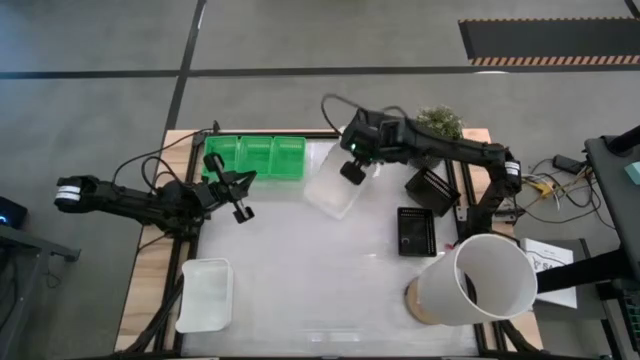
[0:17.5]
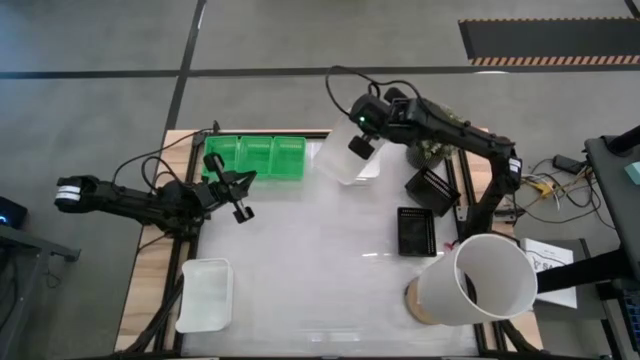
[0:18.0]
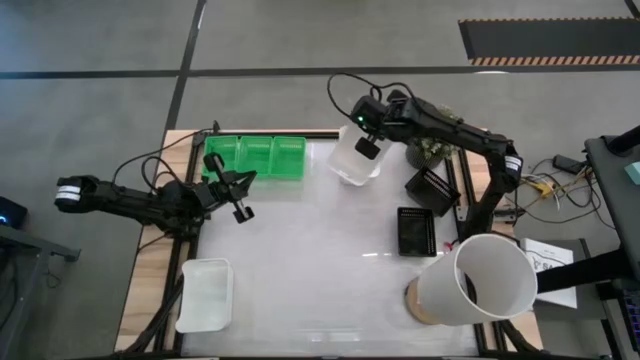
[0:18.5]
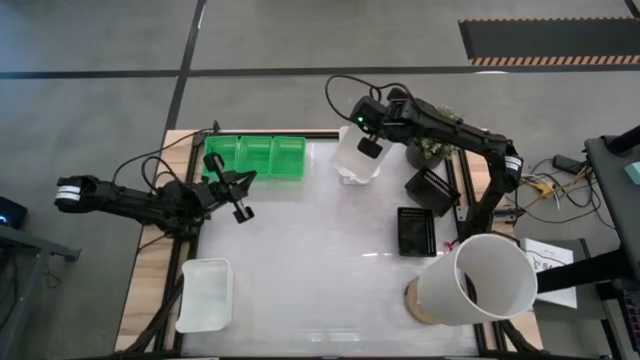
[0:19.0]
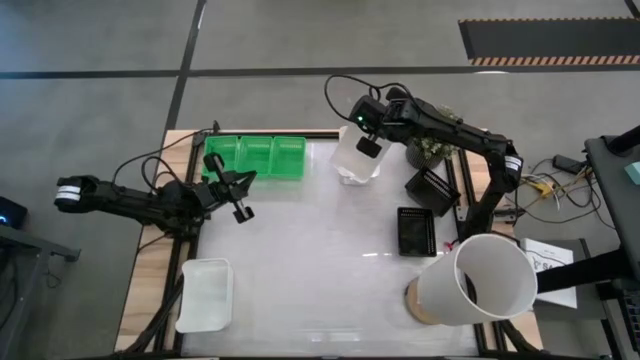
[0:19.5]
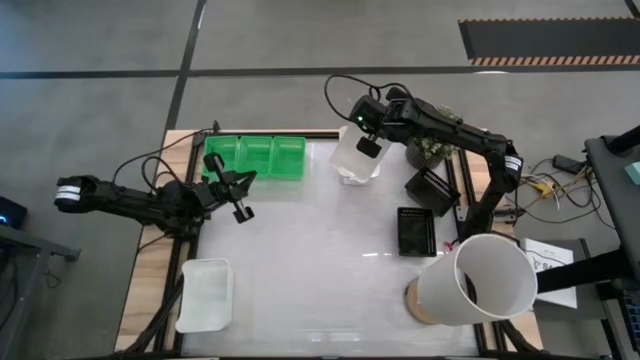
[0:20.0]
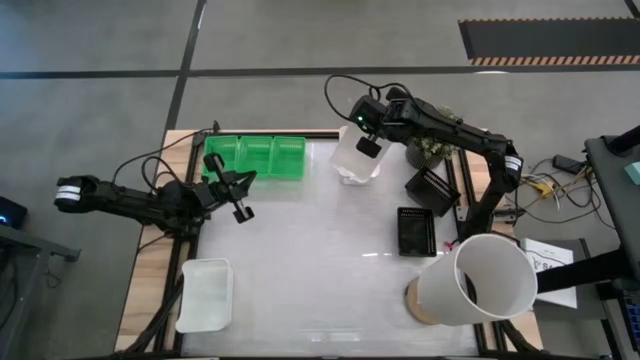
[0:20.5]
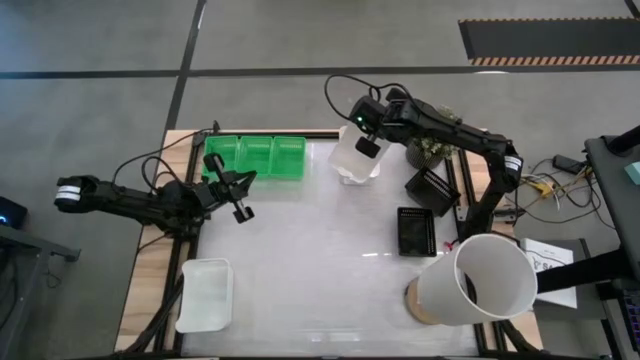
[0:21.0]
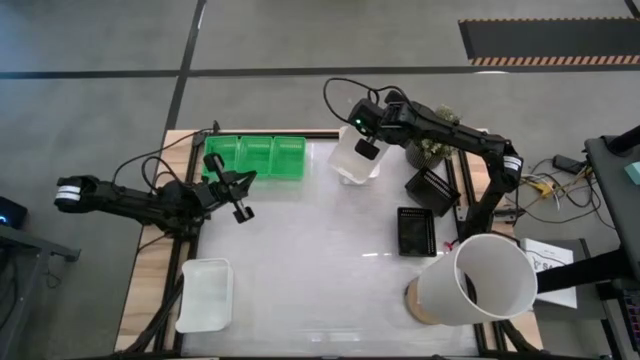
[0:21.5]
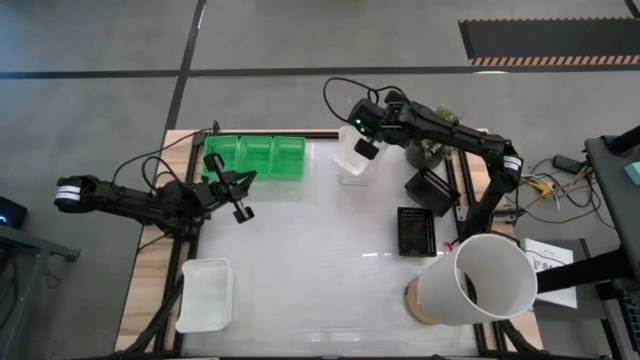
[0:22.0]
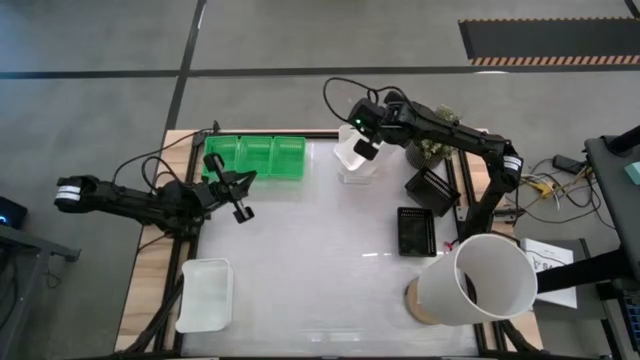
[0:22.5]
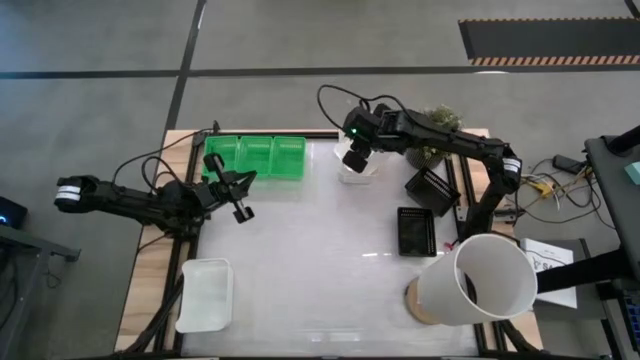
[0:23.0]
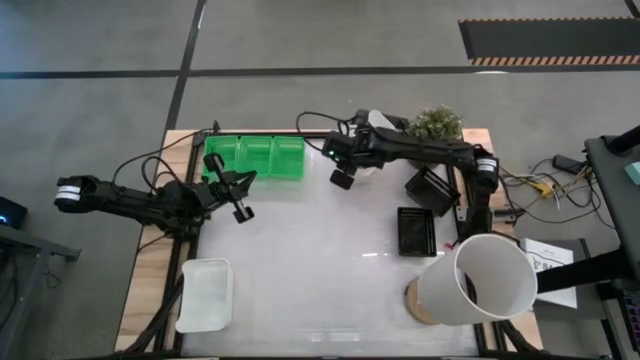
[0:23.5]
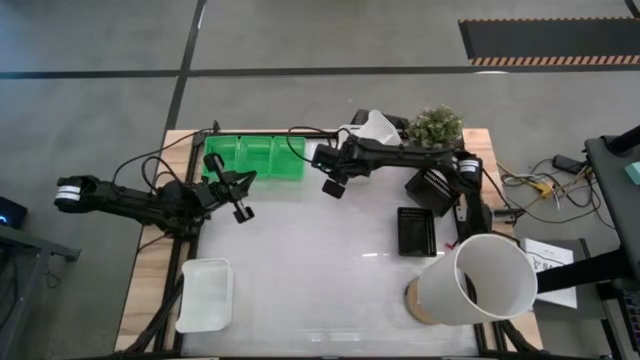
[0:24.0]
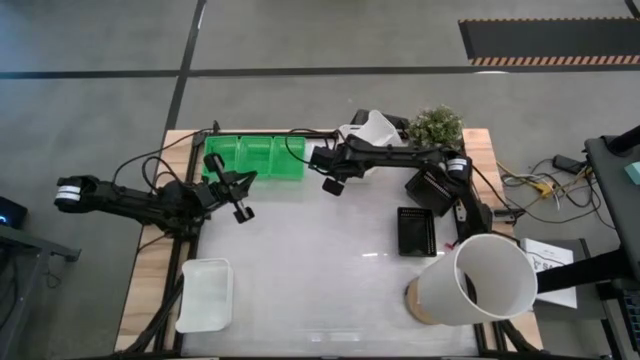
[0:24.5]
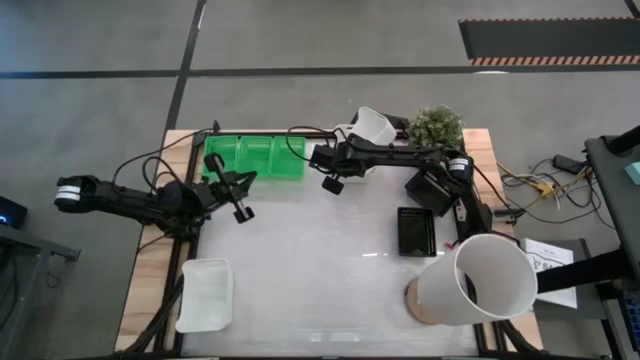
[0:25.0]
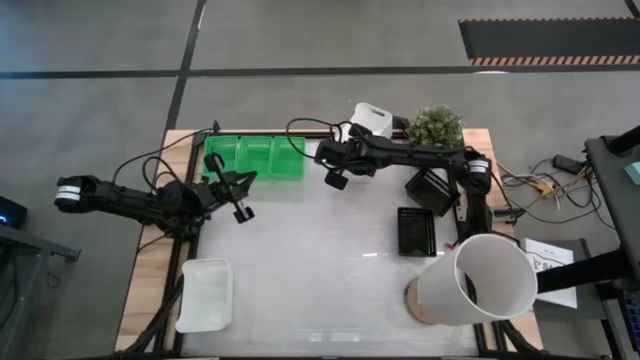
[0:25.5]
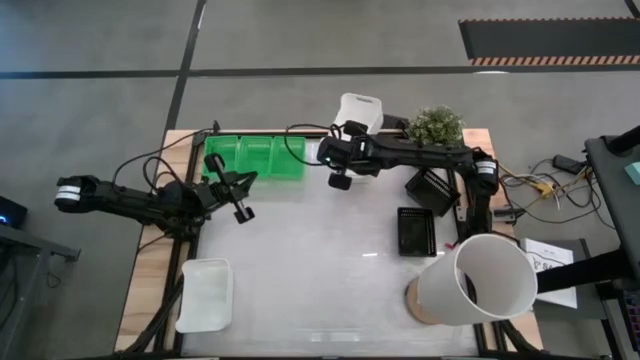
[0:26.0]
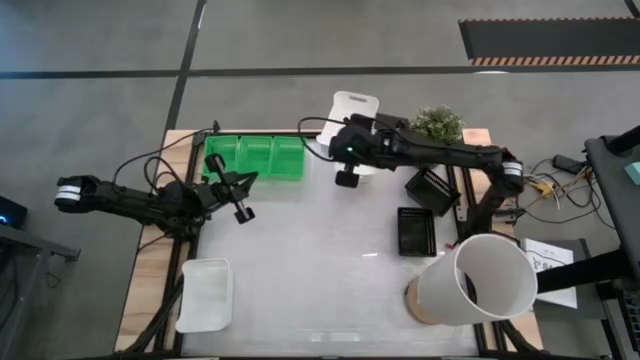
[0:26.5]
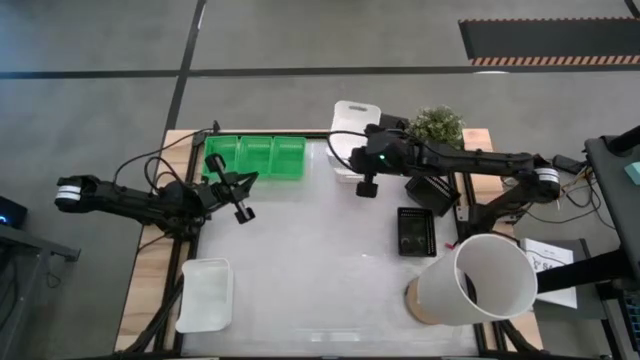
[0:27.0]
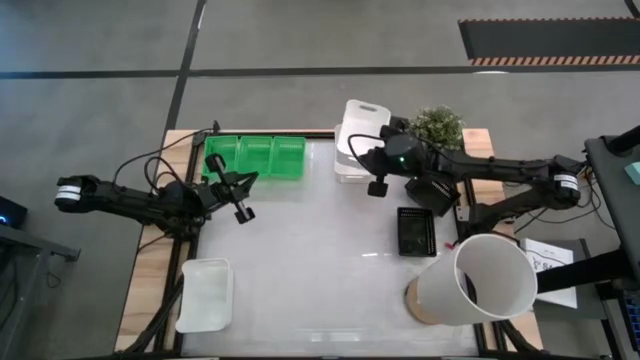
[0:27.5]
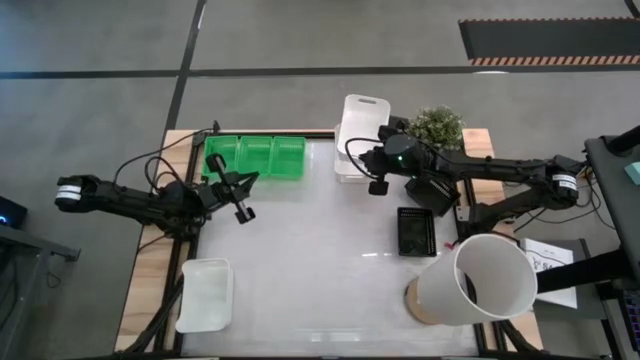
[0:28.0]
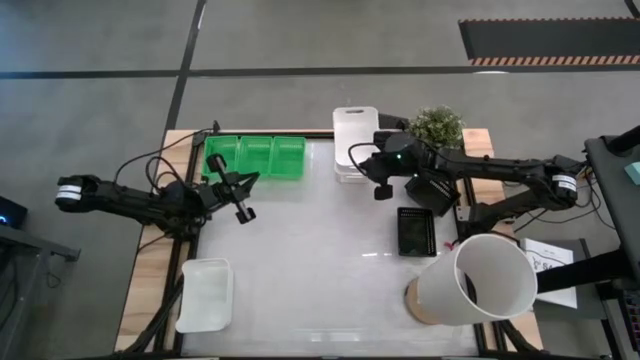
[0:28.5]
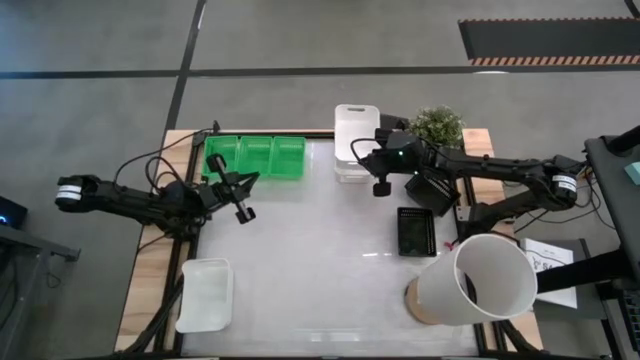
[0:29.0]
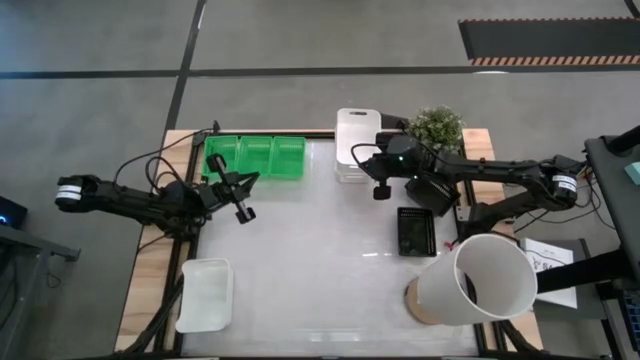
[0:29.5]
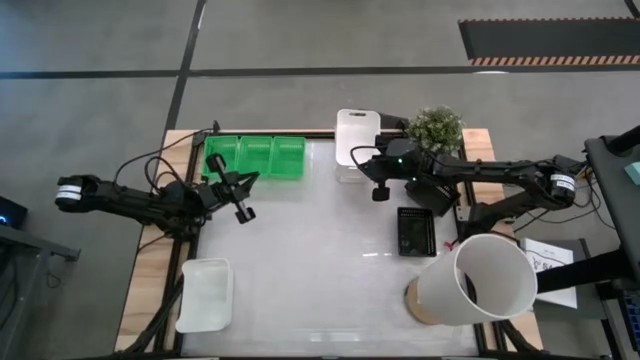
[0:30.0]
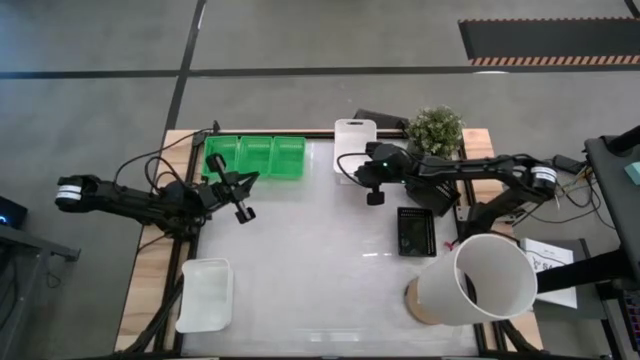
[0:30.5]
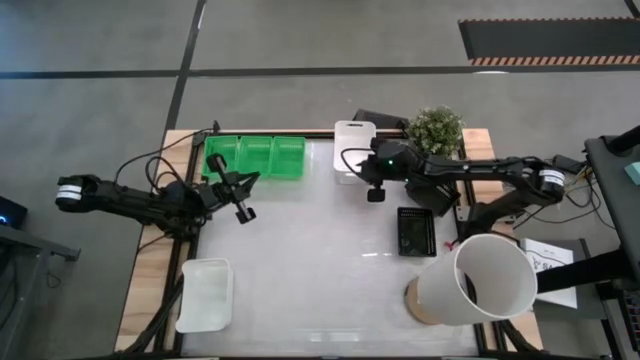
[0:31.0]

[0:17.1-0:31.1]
Stack the middle right white bin on top of the top white bin

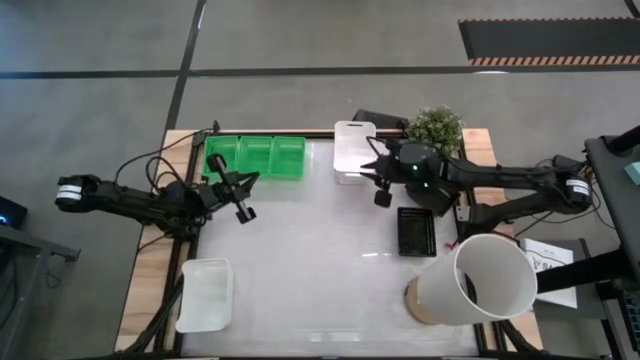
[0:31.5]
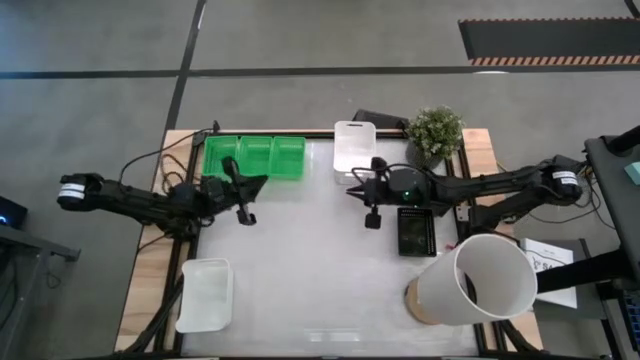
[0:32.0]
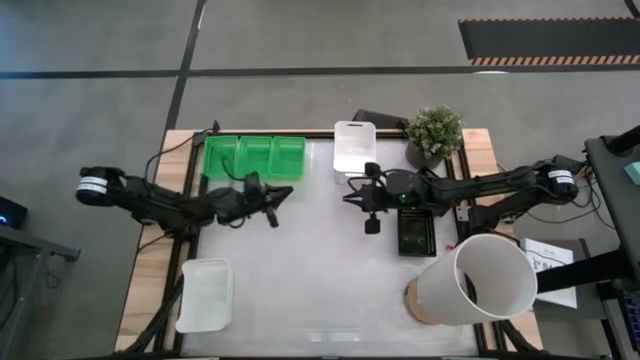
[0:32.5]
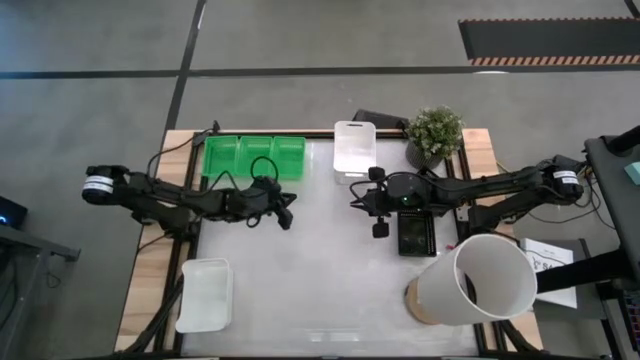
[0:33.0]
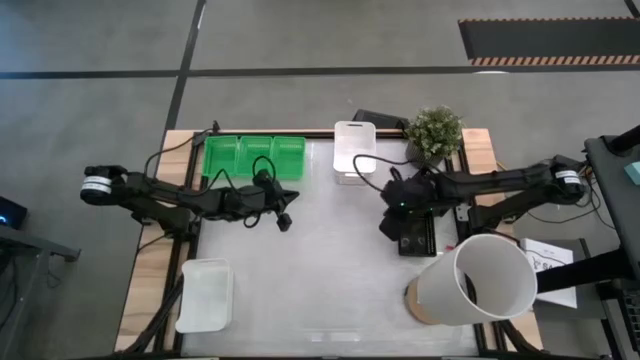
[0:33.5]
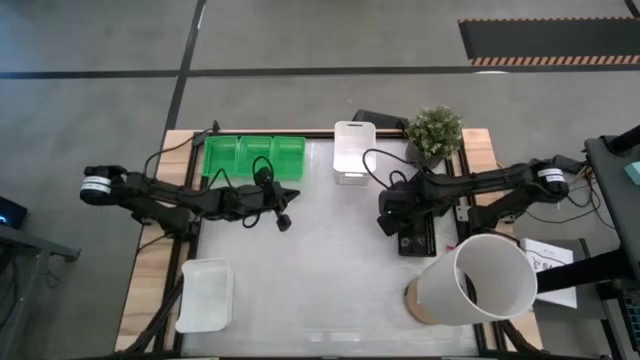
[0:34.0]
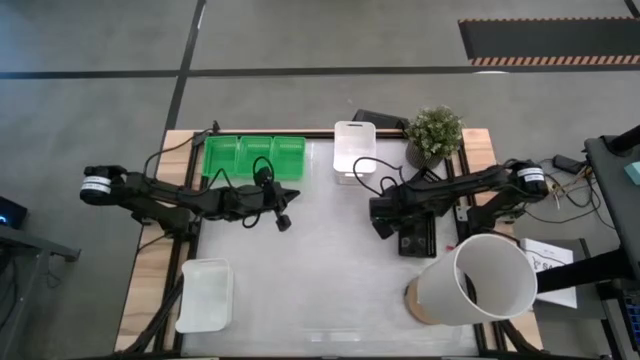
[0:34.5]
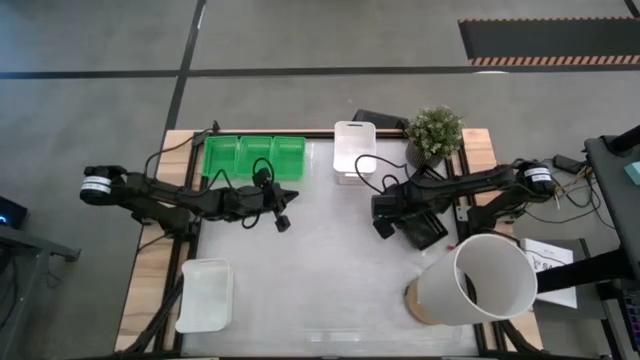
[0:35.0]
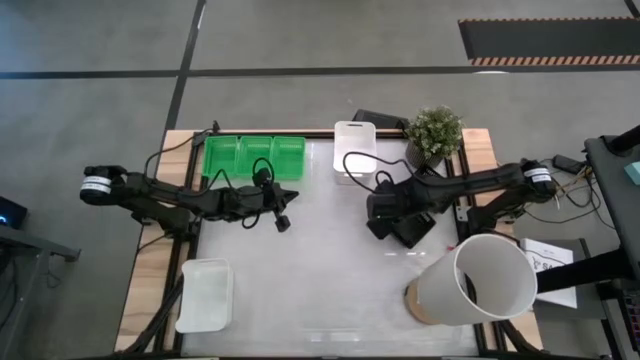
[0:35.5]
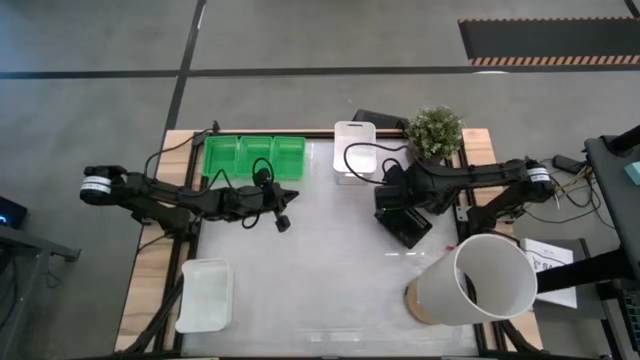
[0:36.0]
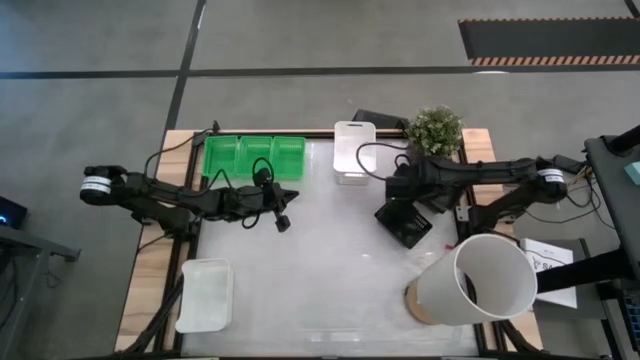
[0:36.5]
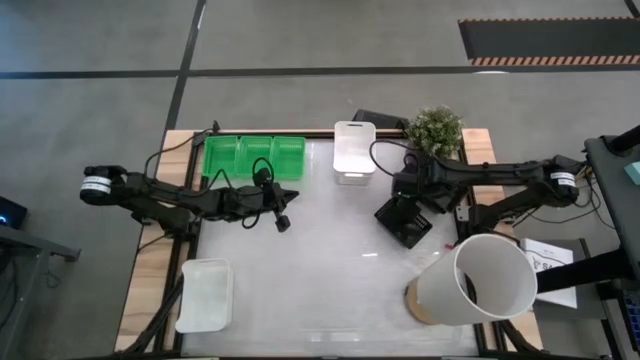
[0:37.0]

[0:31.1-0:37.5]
Stack the left black bin on top of the right black bin
